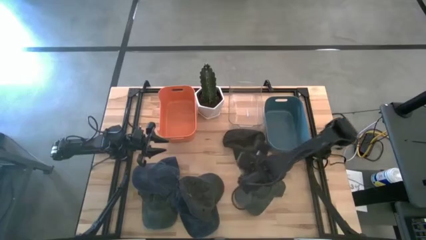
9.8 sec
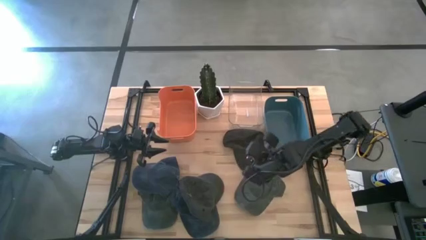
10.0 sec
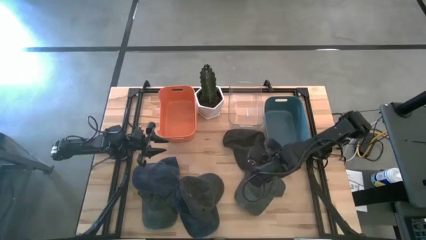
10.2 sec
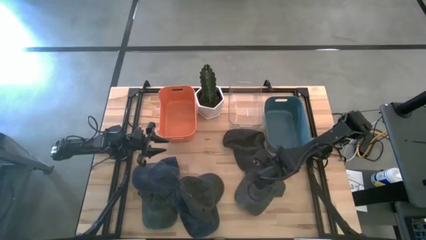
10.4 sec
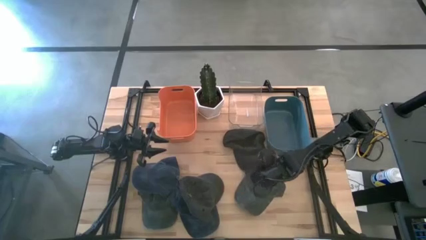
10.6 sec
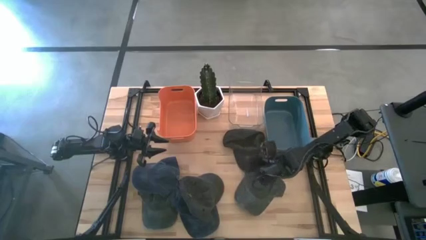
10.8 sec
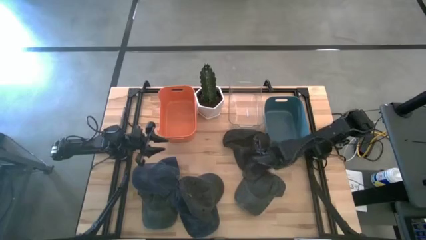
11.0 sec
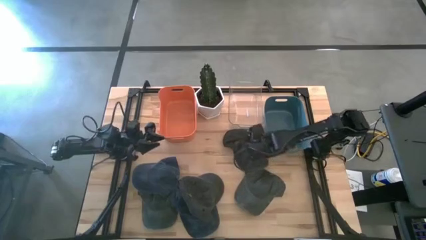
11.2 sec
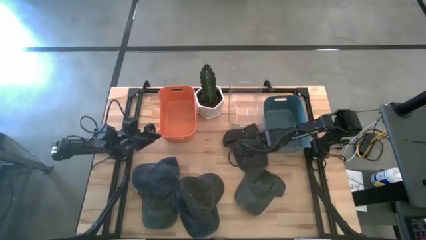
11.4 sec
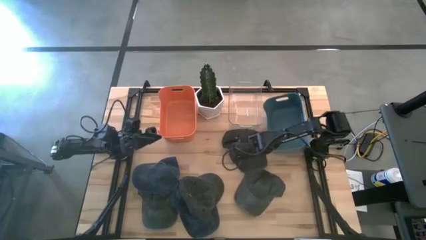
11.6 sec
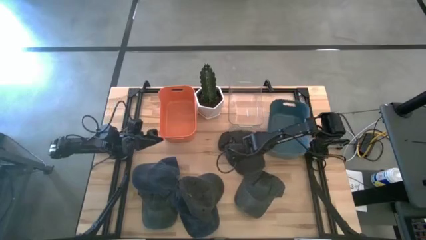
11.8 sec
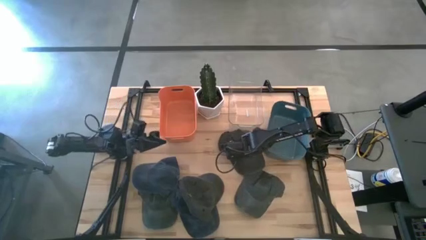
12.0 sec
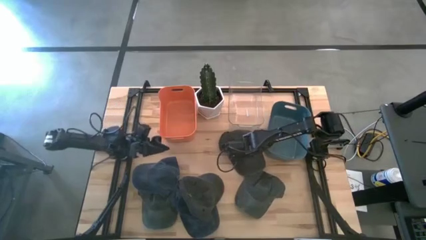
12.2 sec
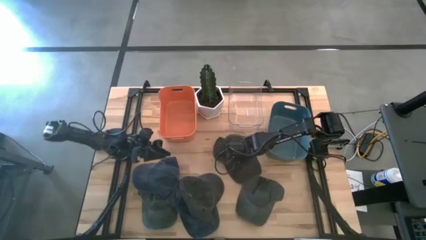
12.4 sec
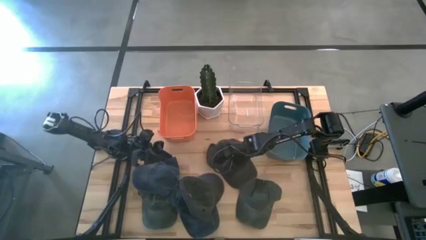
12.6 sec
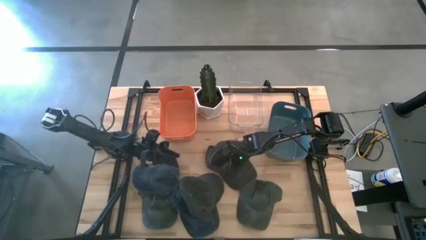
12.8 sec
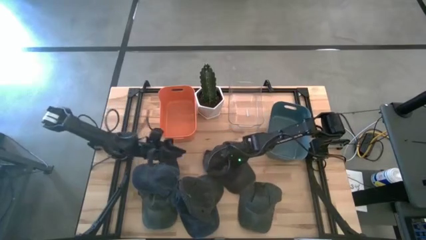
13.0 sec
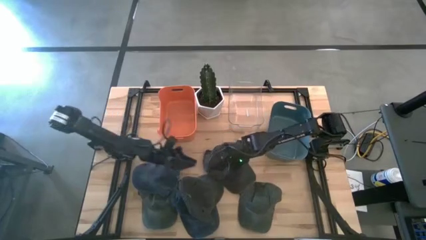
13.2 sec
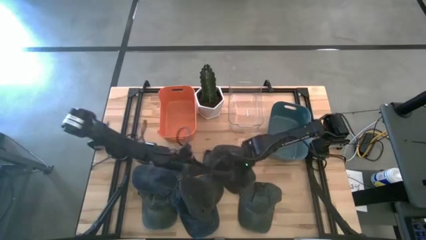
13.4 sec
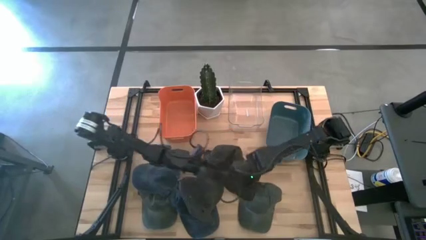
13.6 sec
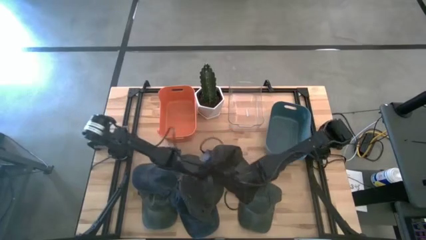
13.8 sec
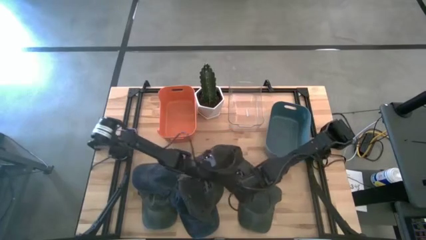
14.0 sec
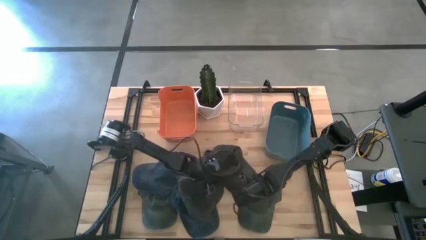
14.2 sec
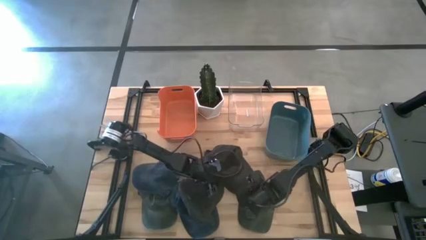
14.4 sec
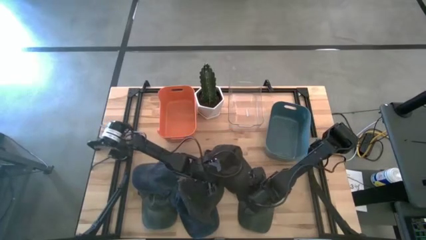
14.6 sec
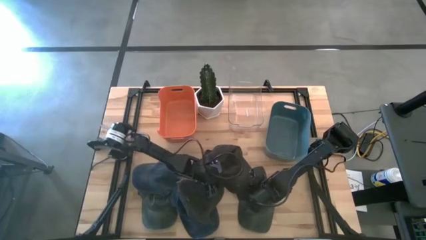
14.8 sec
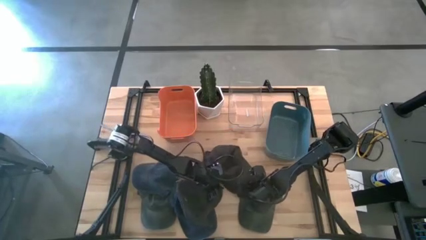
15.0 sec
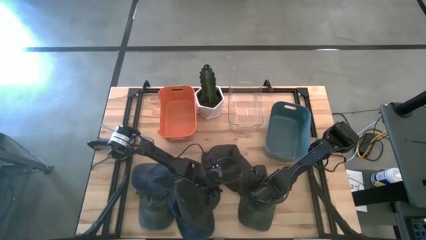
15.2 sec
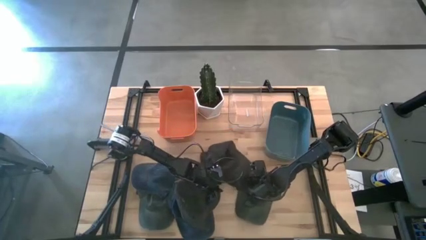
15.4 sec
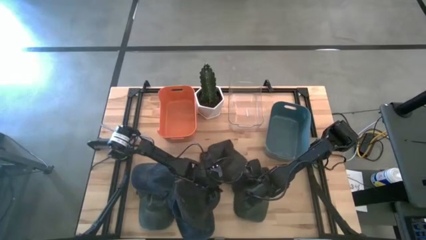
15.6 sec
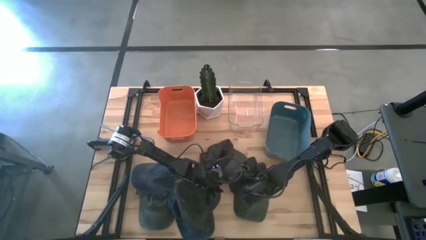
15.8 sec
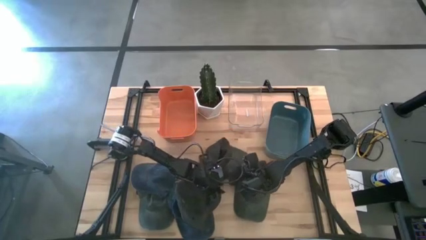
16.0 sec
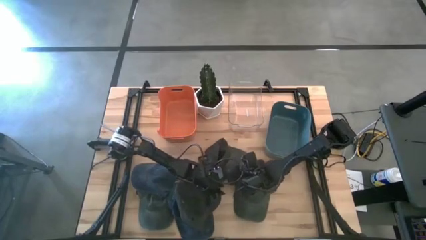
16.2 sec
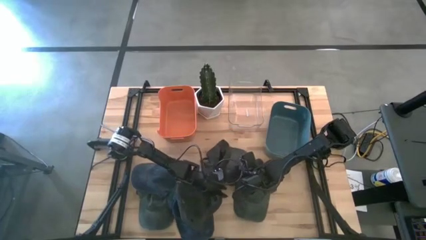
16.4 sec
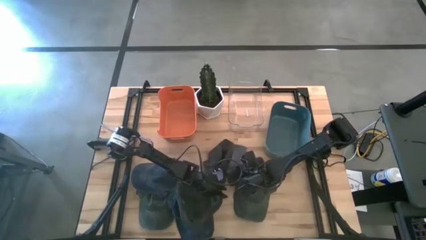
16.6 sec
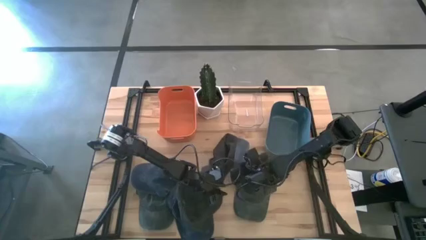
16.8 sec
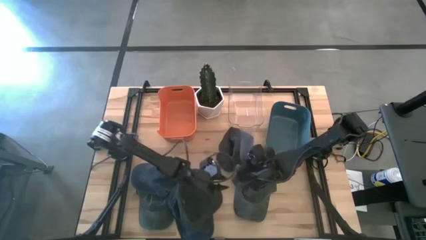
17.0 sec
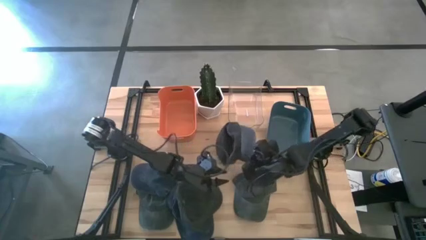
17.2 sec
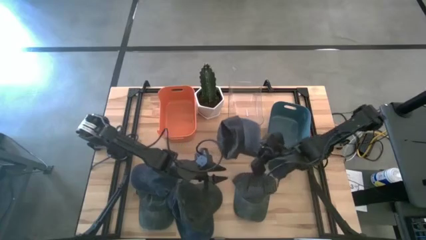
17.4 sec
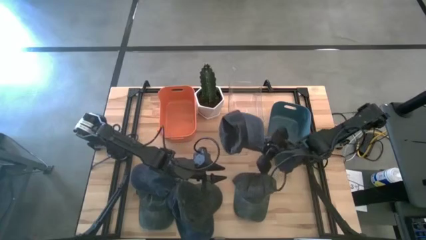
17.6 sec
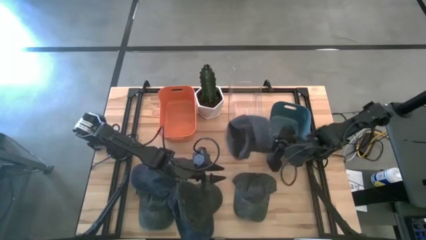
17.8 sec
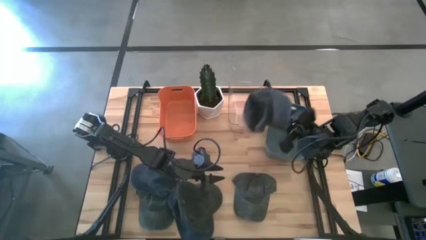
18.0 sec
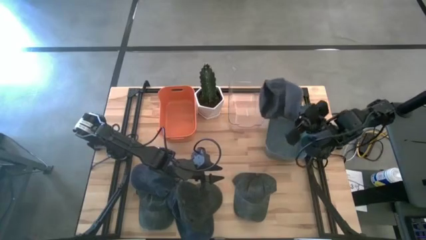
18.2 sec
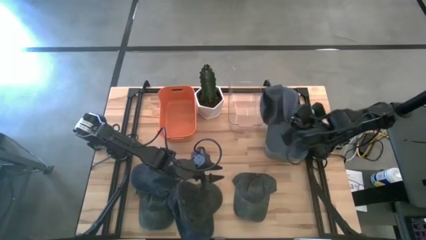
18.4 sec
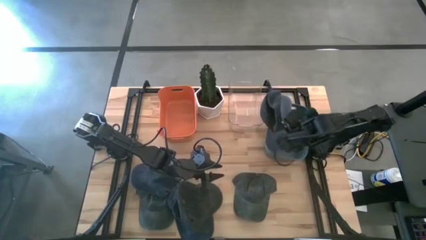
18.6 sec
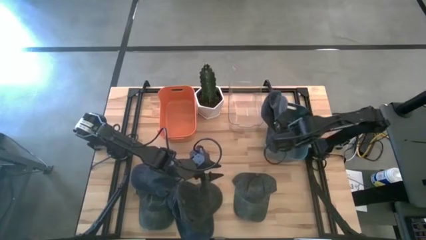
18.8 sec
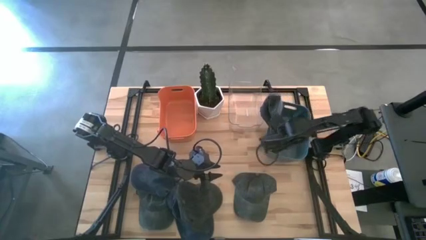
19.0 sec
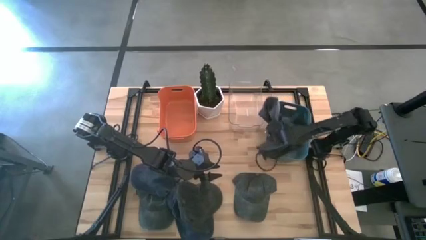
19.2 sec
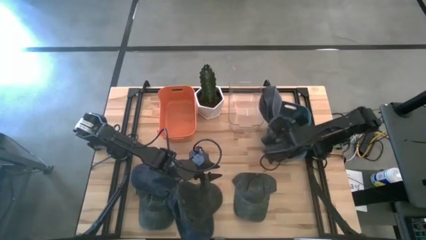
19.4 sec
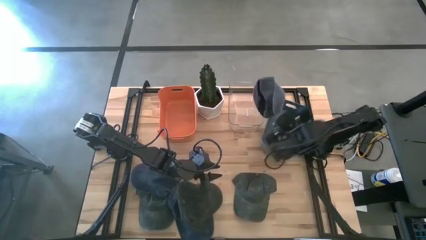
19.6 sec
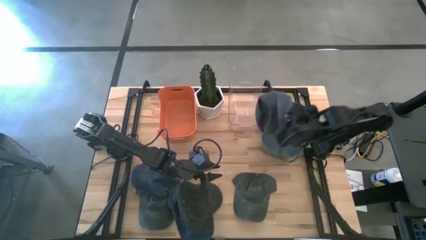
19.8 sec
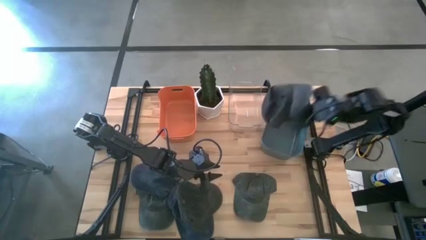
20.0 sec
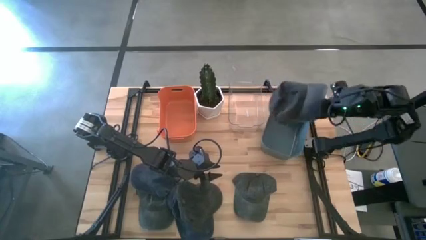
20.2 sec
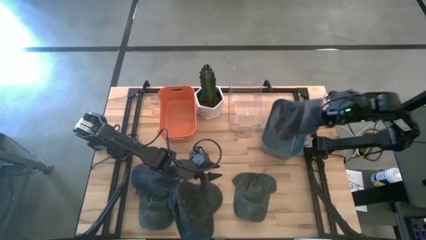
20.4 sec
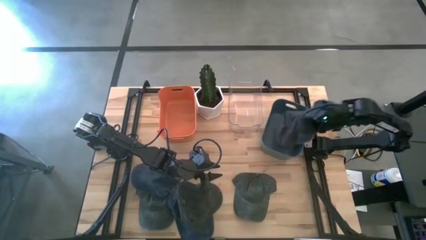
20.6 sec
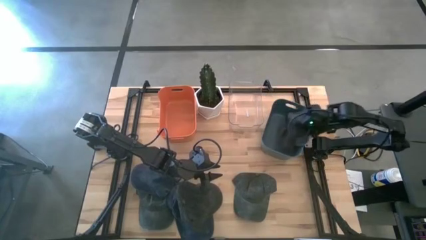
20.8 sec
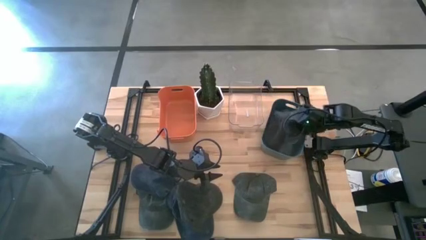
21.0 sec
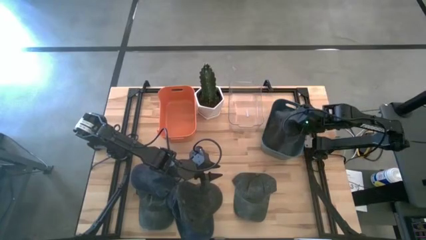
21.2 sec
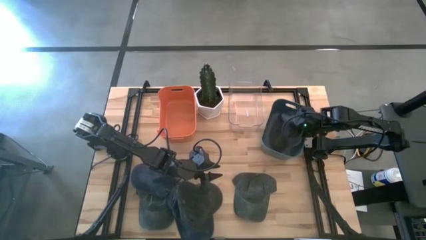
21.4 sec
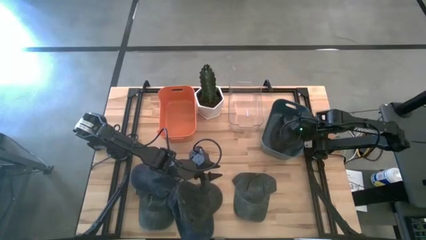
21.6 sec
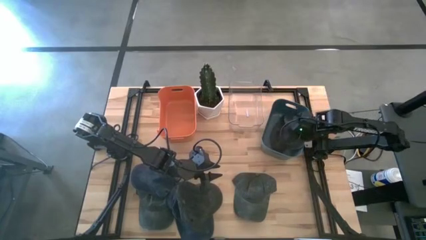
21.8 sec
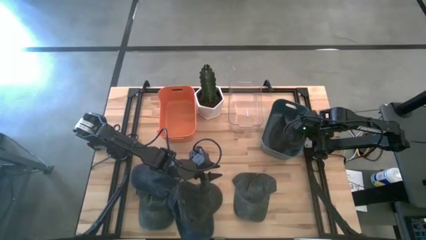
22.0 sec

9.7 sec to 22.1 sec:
Task: Pick & Place hat
Put the right black cap into the blue bin

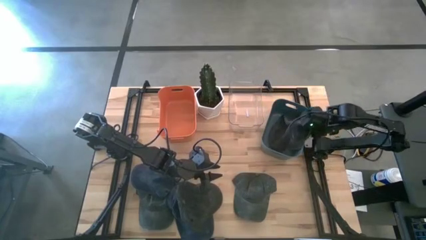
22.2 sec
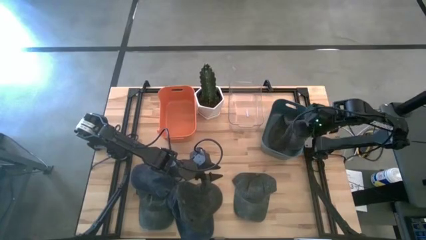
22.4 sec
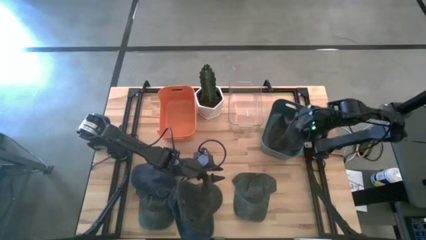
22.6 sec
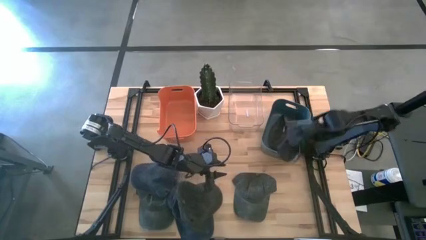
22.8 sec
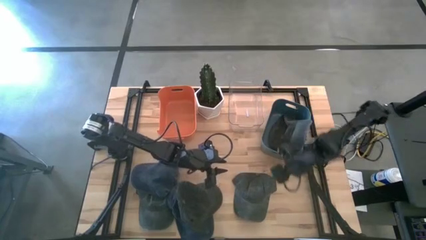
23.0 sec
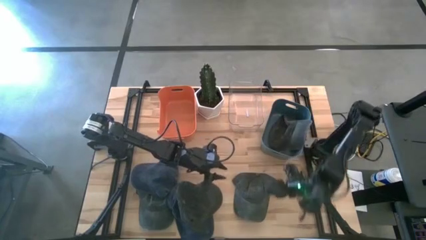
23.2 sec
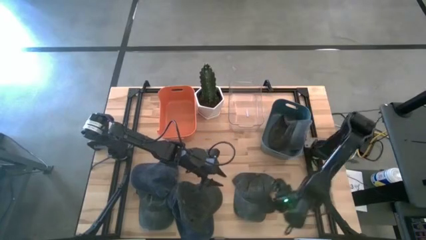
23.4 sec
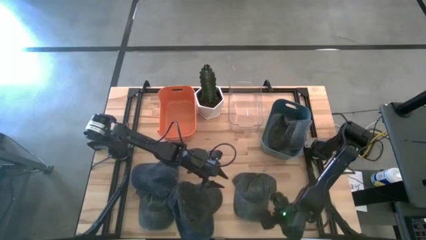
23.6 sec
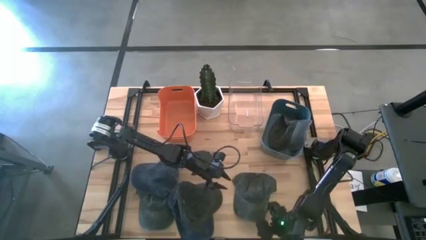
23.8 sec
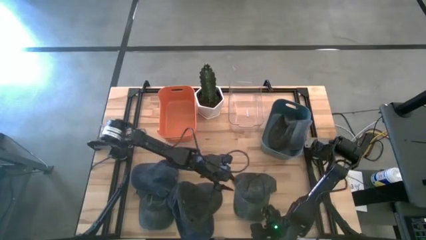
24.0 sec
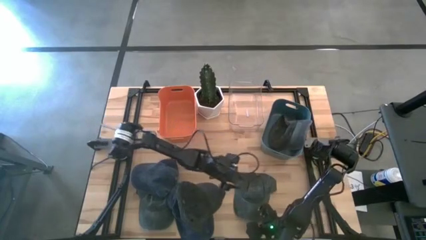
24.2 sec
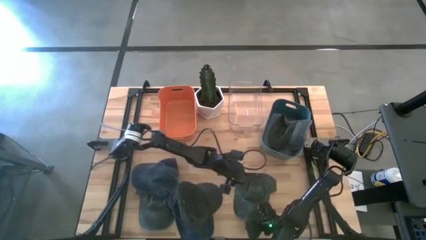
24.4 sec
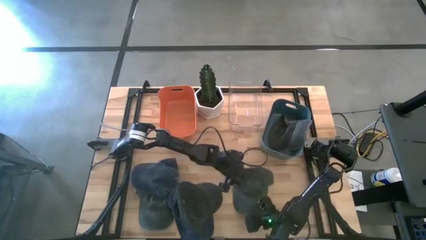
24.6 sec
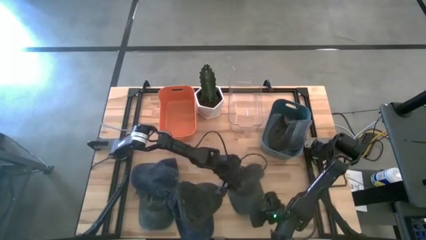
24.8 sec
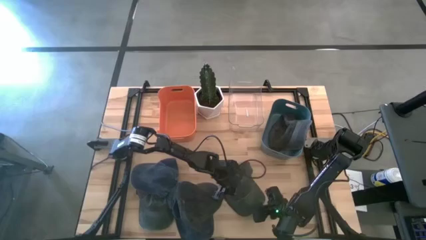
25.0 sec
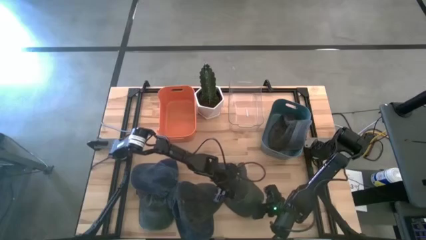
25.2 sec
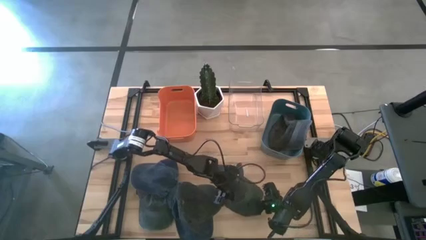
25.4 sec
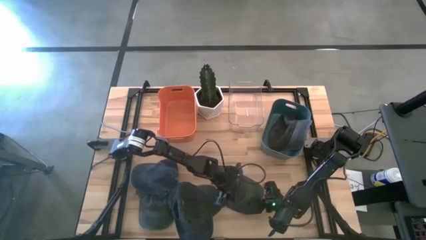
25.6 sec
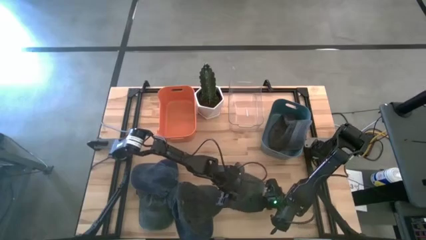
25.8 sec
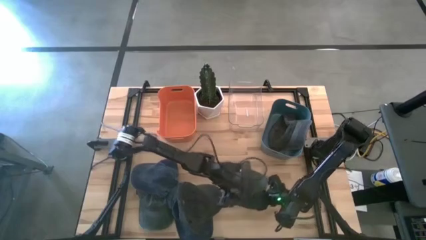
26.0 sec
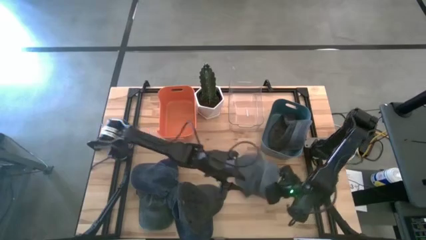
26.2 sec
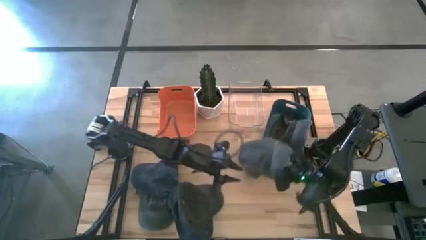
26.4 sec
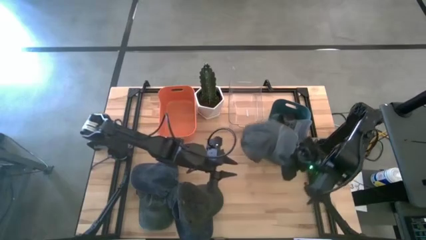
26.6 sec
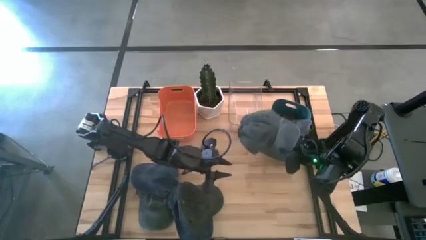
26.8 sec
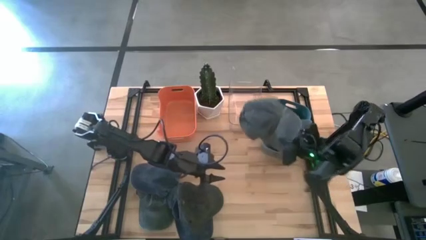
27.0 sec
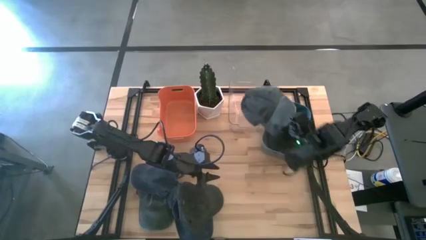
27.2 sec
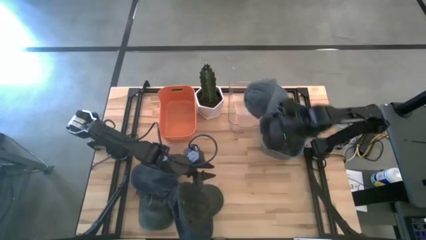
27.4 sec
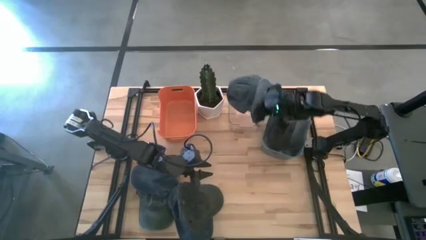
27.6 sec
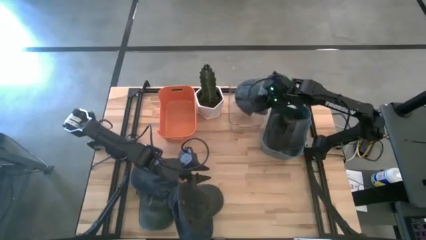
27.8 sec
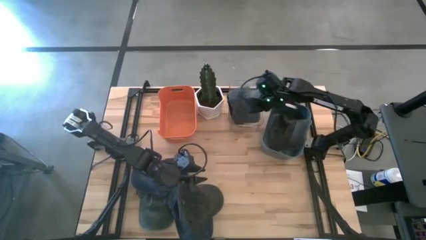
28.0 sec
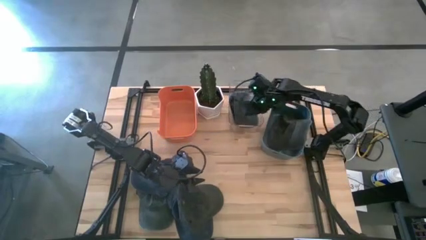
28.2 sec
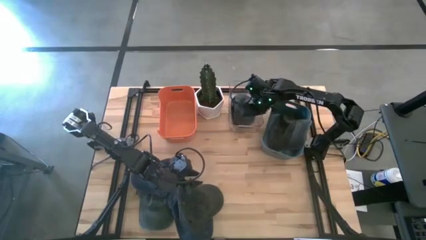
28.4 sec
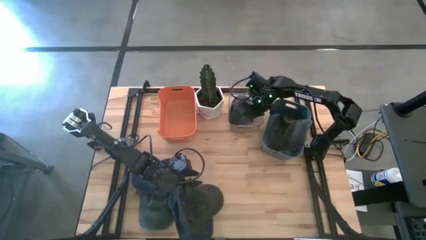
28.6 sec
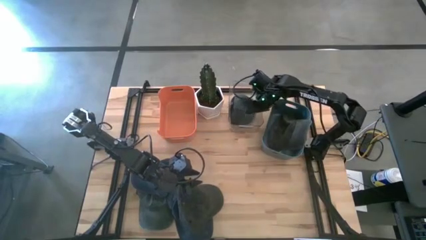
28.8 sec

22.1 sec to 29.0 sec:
Put the right gray cap into the transparent bin
